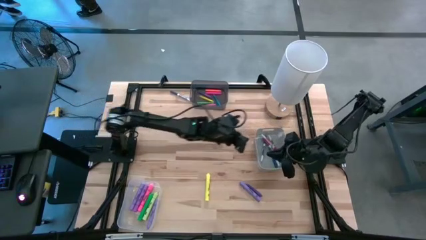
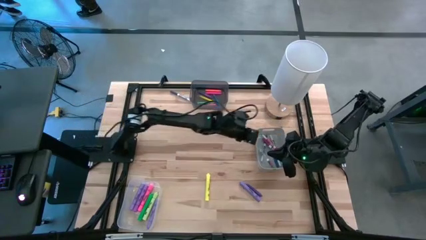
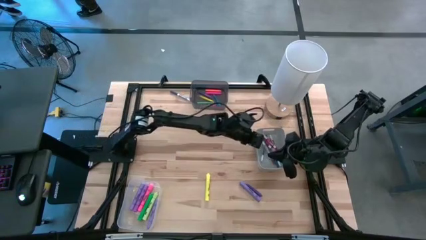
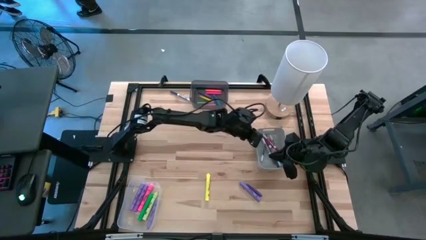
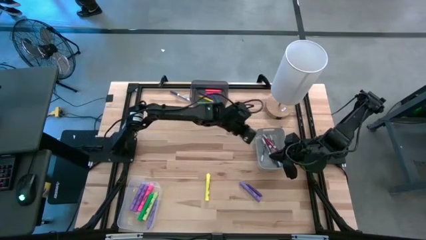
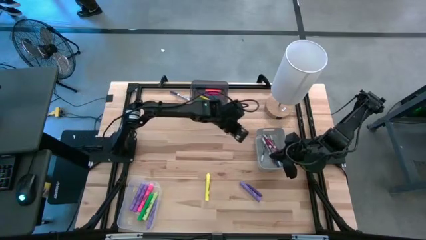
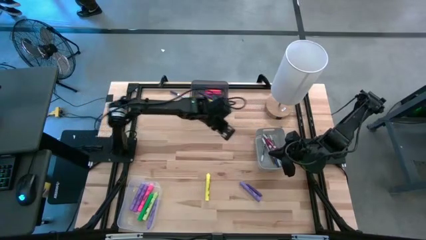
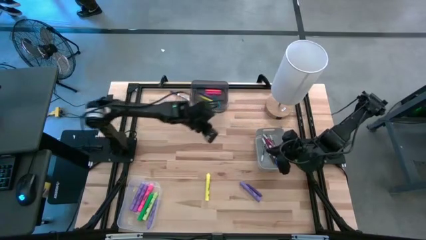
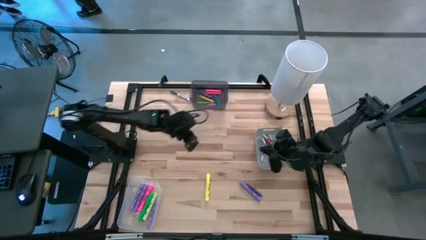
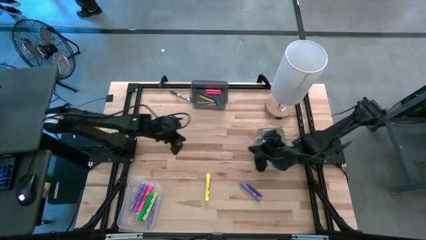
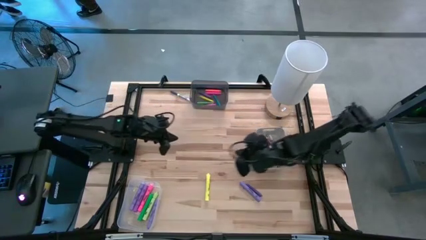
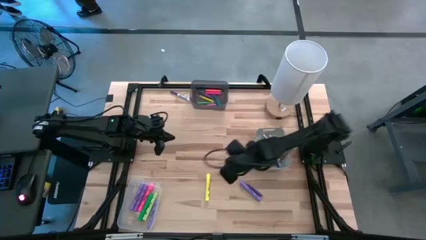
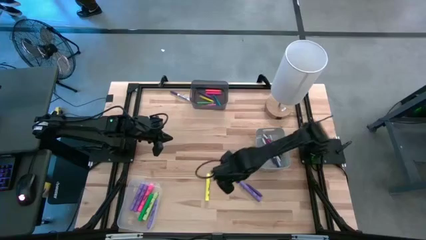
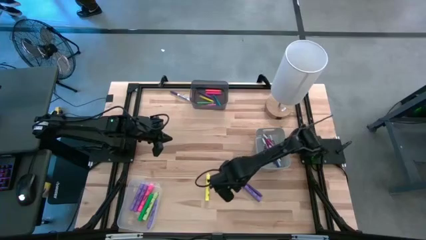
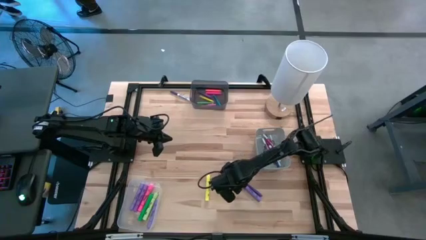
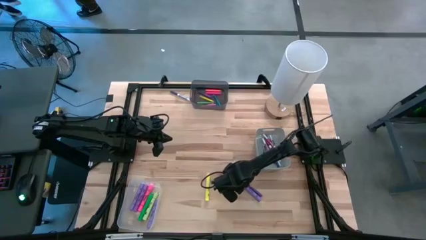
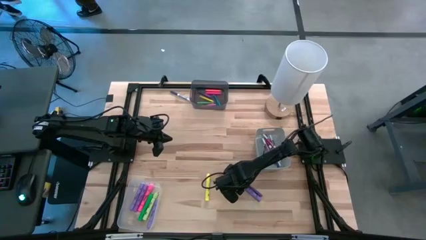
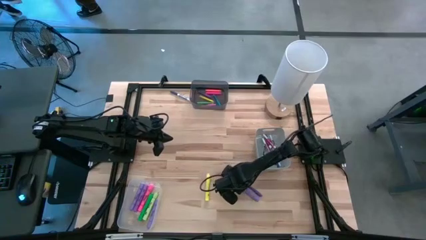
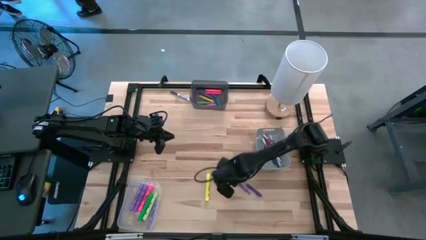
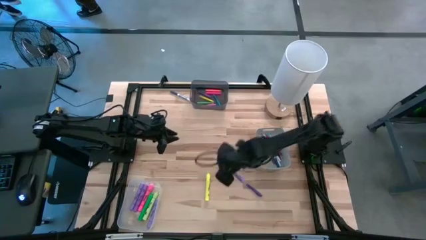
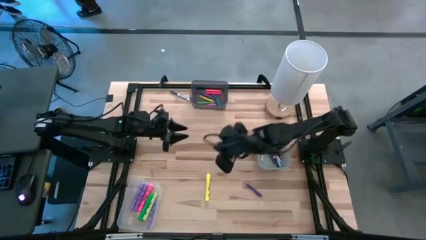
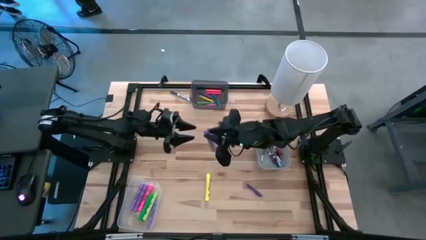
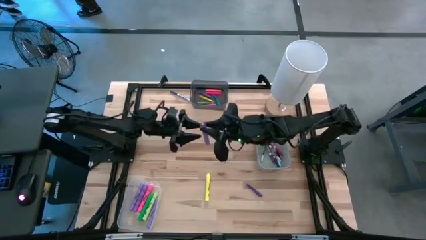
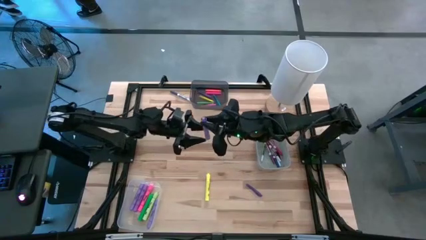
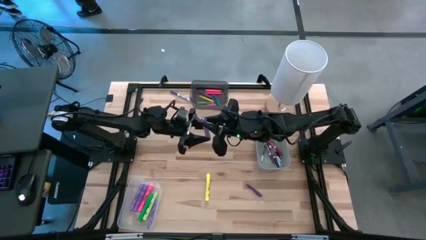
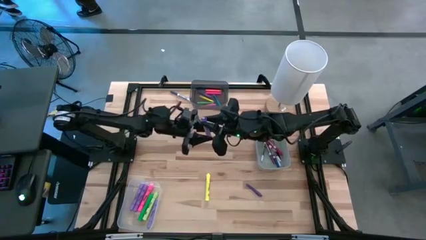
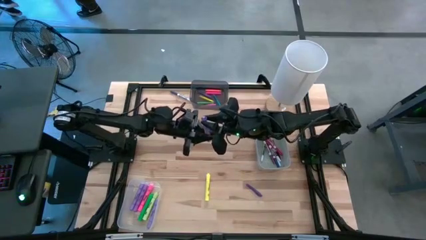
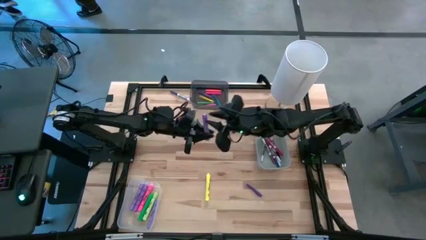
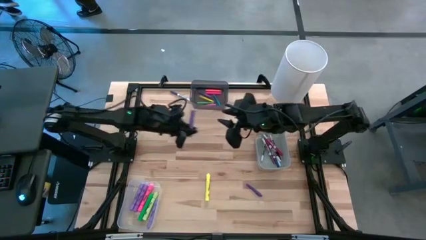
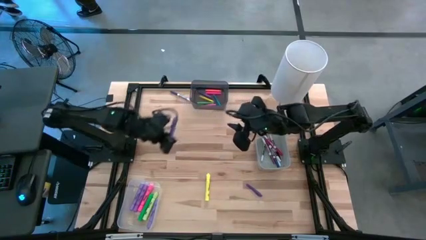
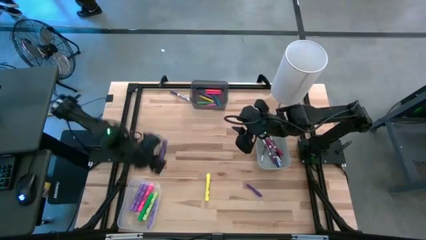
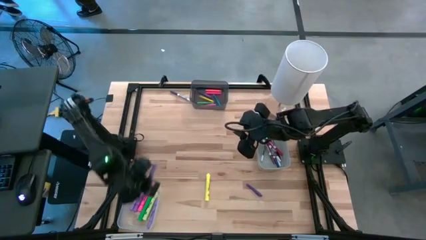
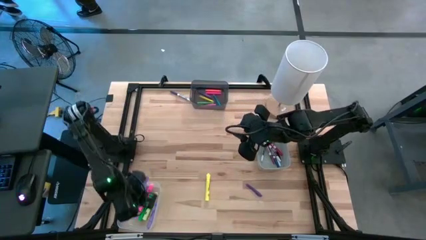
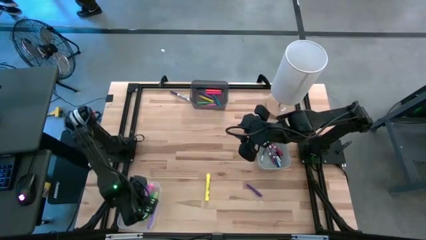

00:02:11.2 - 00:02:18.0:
Task: Pick & Place Markers
Put the purple highlighter pen into the transparent bin

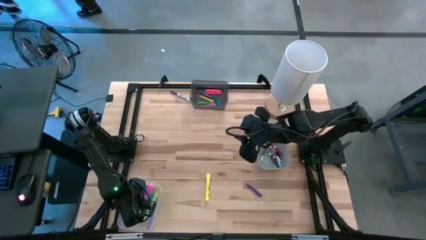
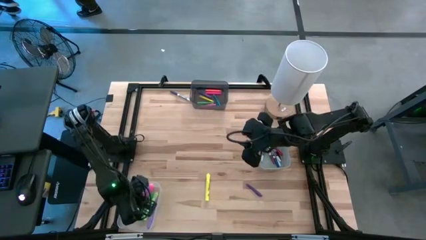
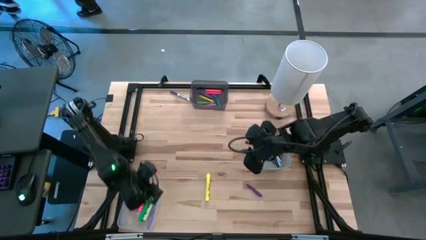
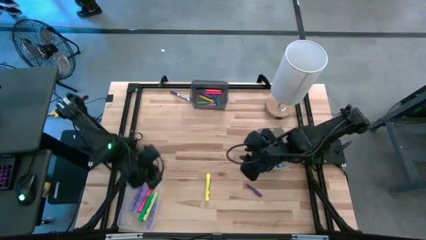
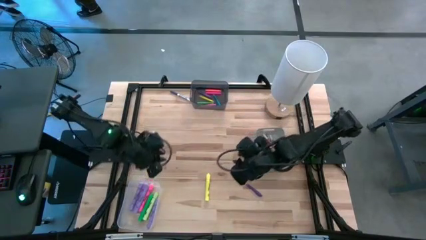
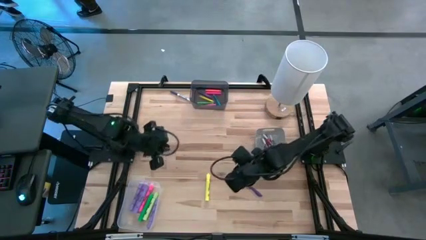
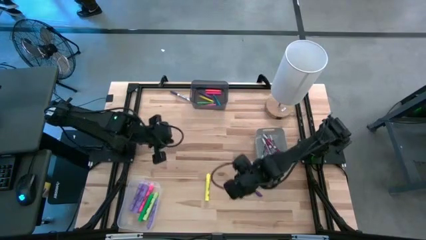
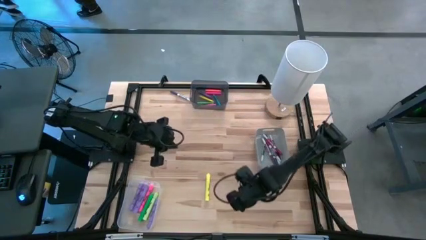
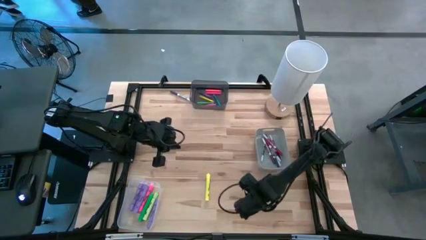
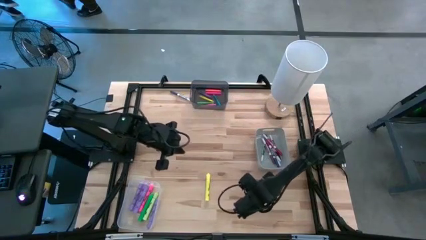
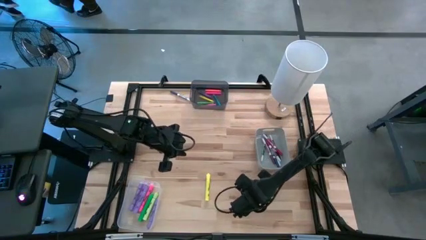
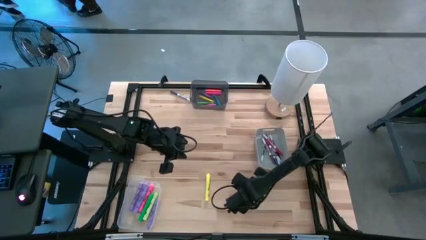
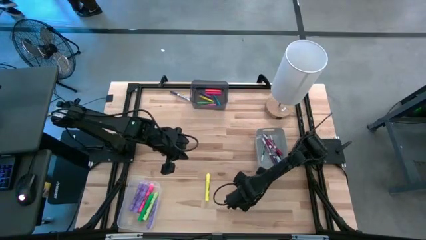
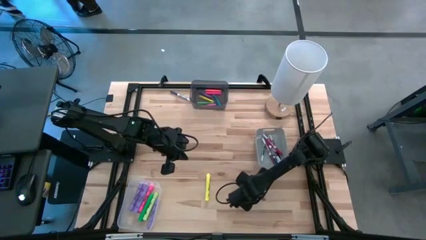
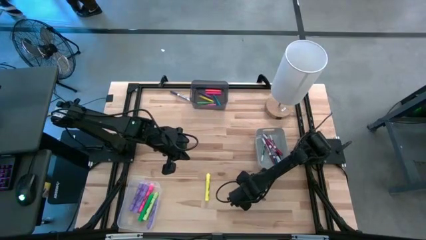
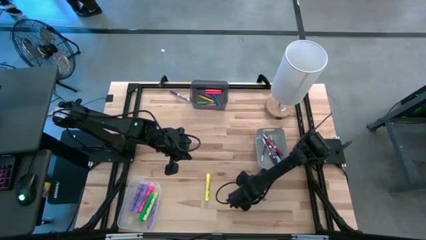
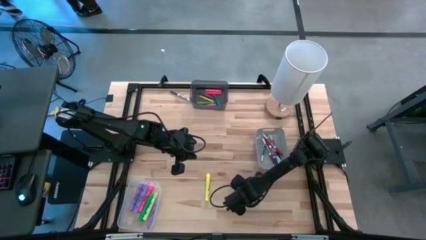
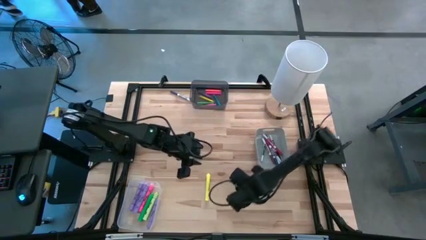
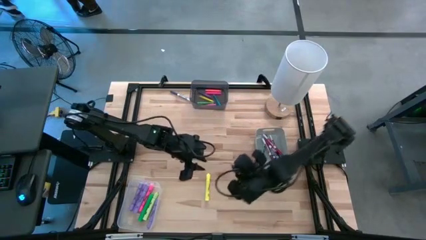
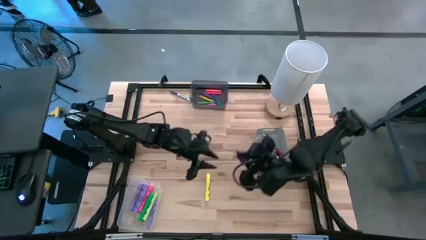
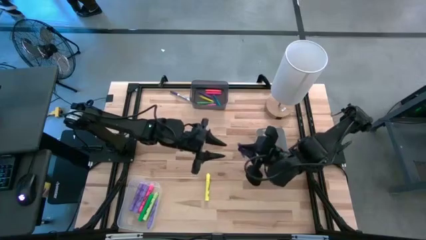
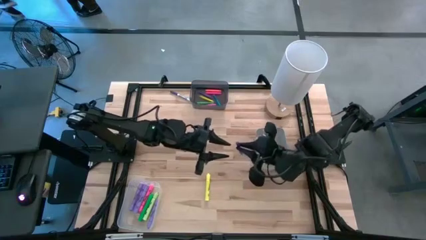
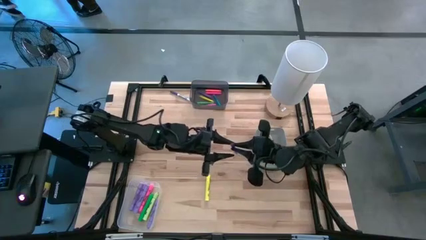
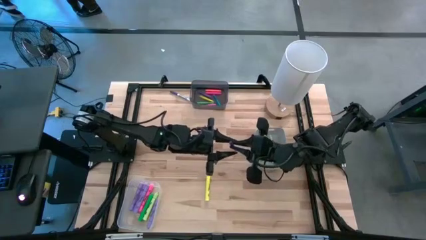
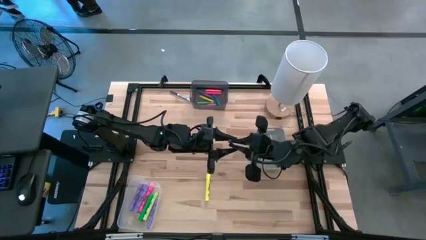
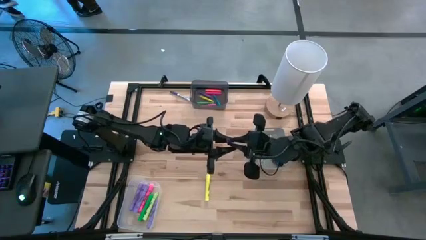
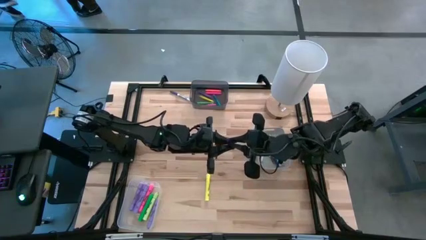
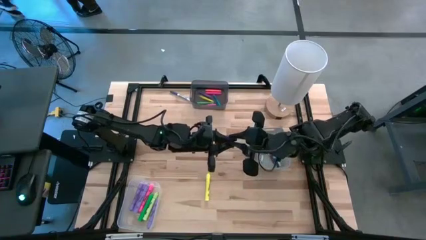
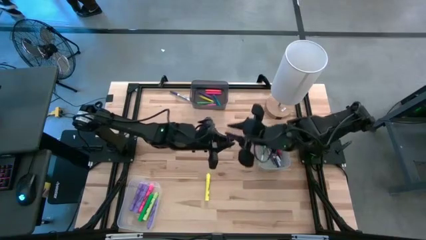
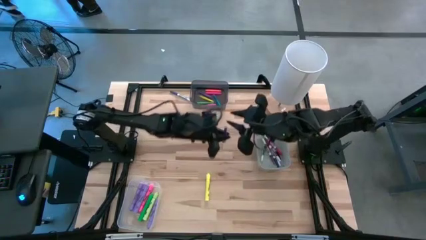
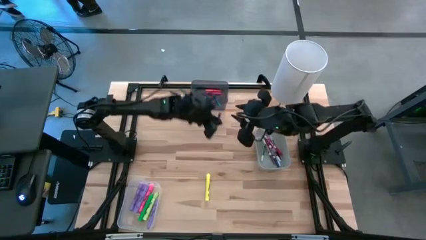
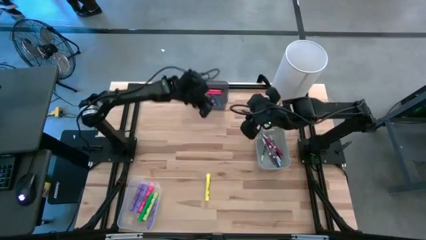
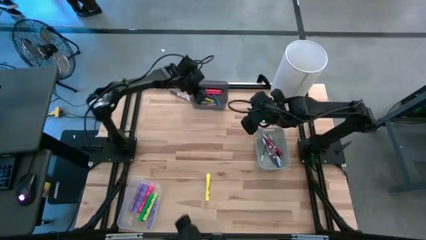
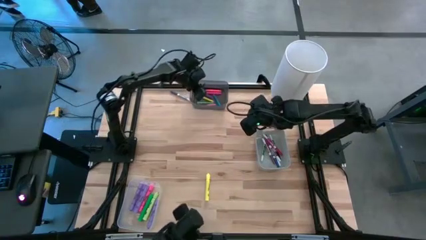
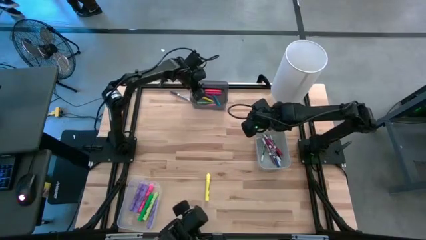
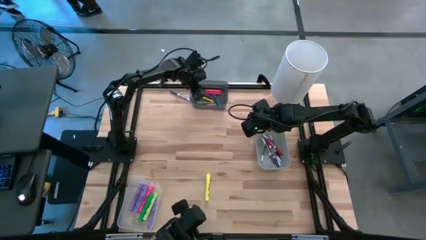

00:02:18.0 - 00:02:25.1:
Put the purple pen into the black bin

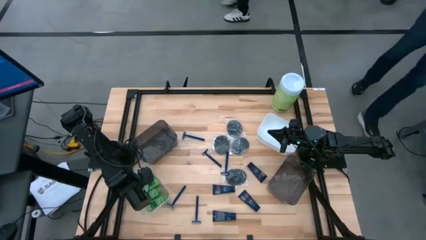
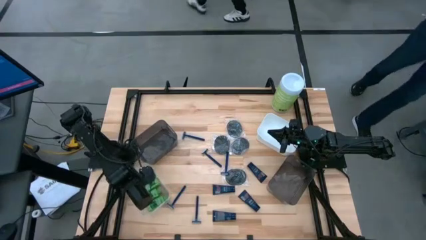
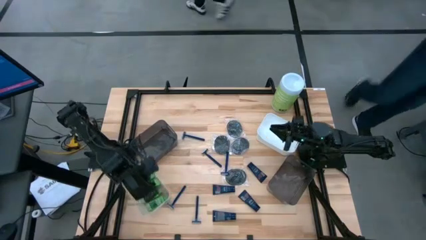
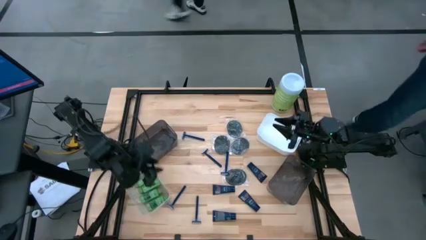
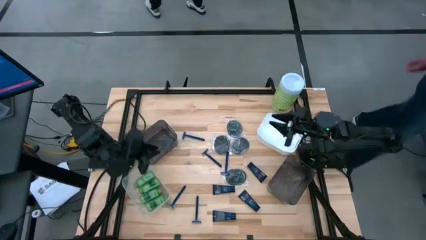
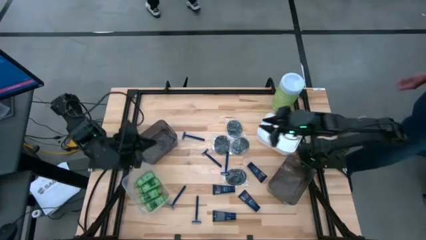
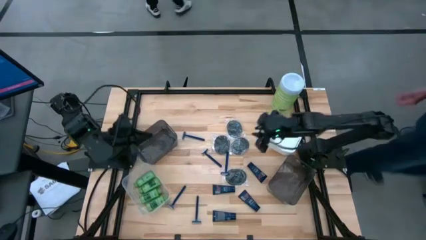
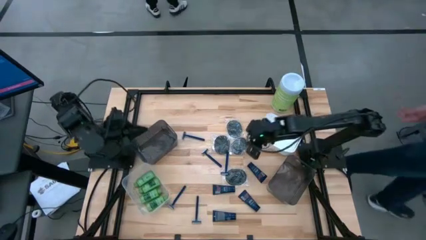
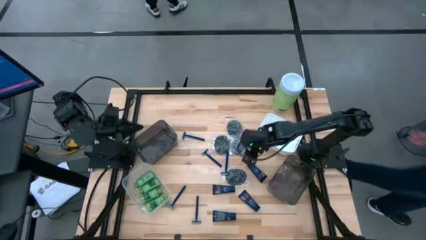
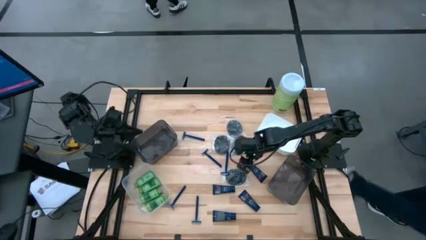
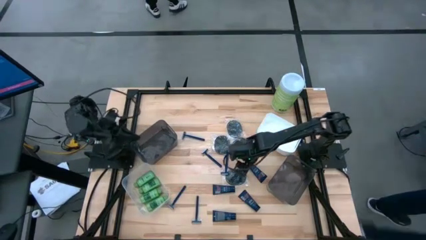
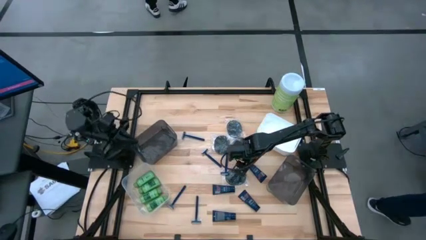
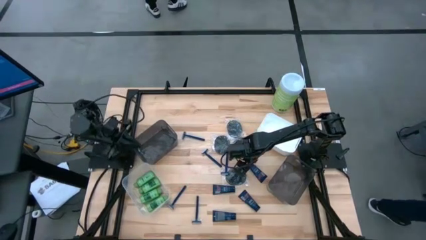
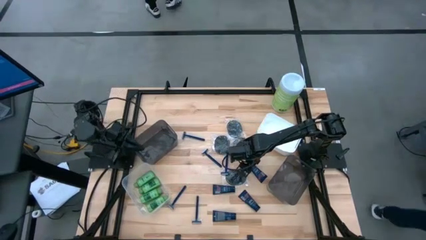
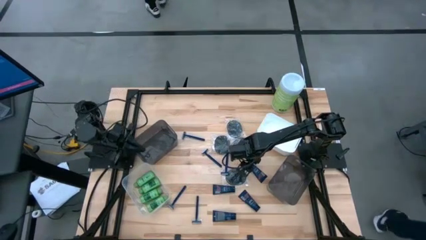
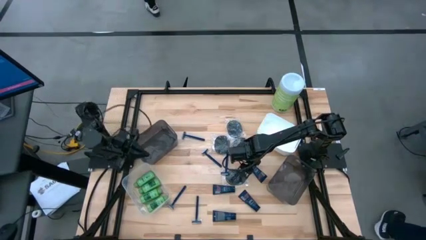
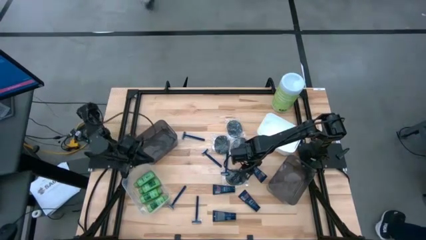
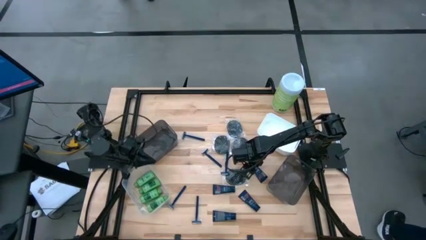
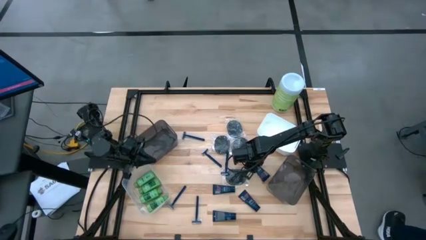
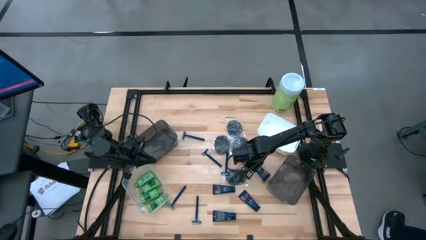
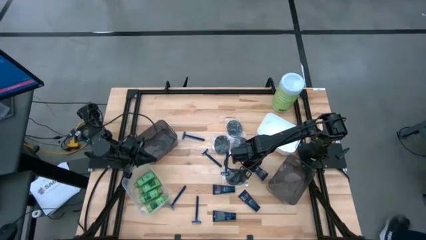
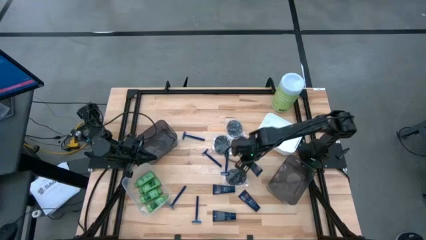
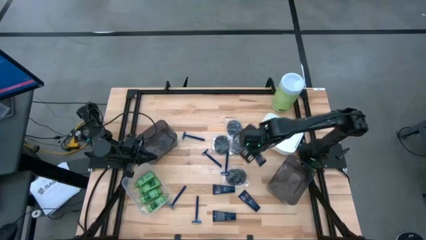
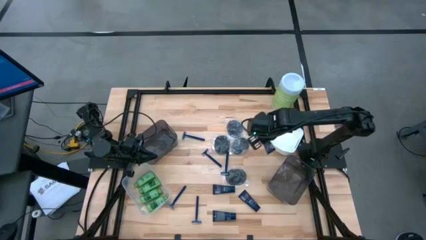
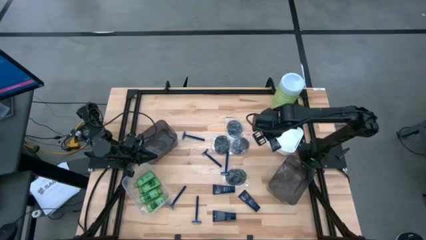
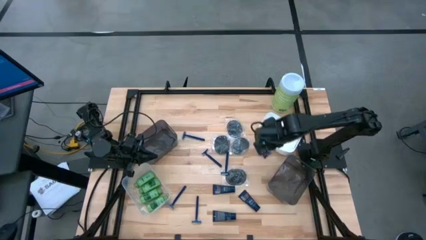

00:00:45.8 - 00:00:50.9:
Task: Pick & Place Travel size toiletries
Put the blue shave cream into the right black bin
